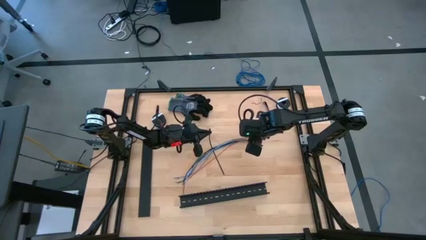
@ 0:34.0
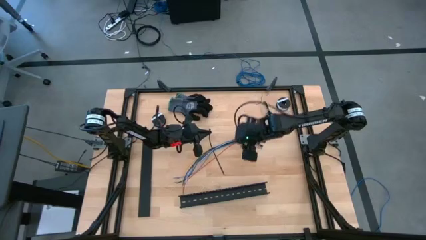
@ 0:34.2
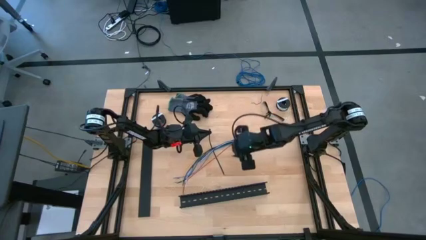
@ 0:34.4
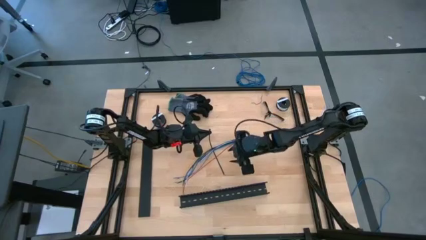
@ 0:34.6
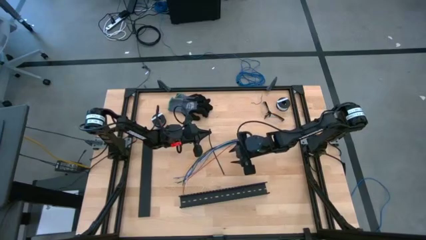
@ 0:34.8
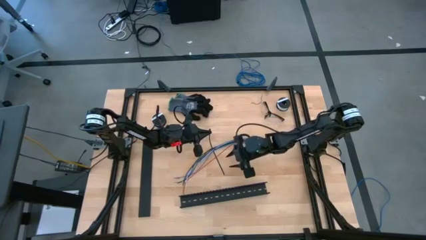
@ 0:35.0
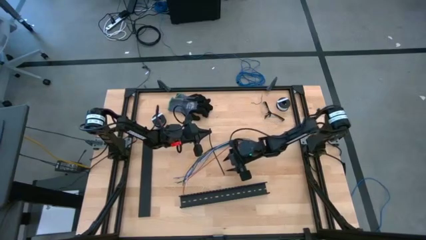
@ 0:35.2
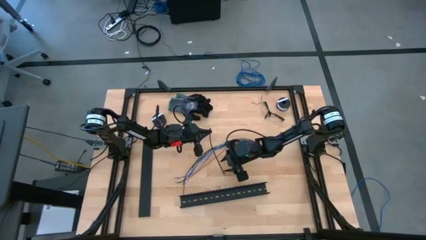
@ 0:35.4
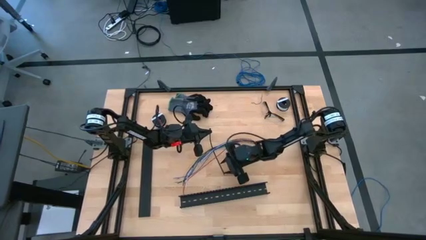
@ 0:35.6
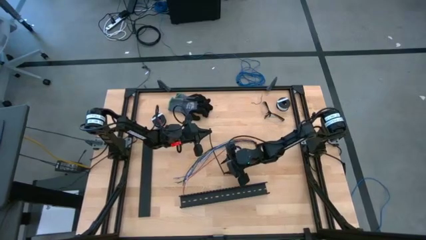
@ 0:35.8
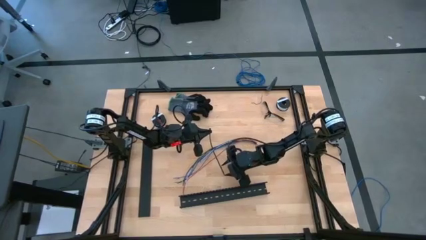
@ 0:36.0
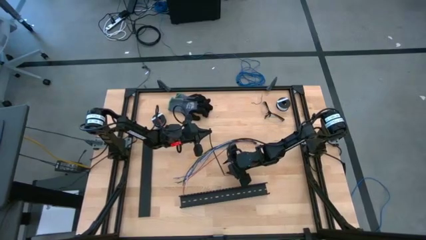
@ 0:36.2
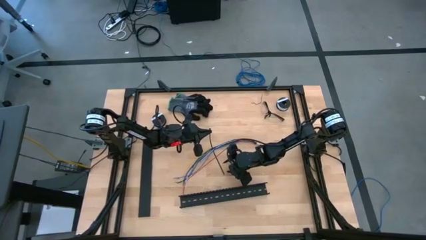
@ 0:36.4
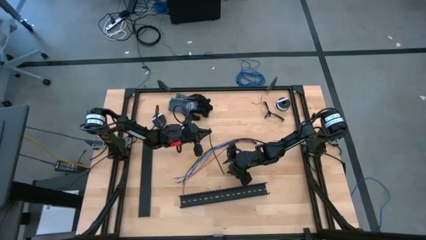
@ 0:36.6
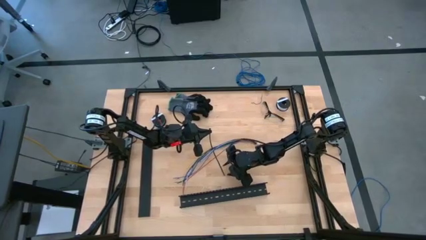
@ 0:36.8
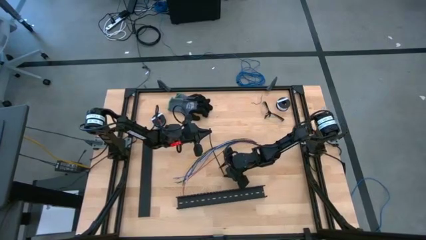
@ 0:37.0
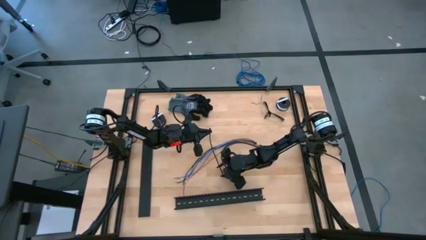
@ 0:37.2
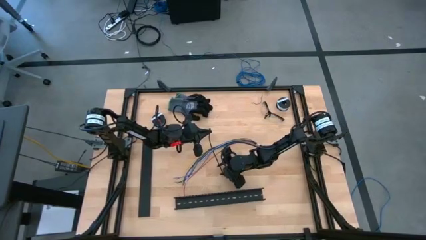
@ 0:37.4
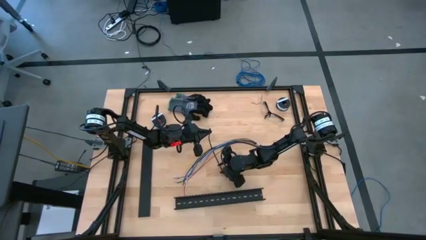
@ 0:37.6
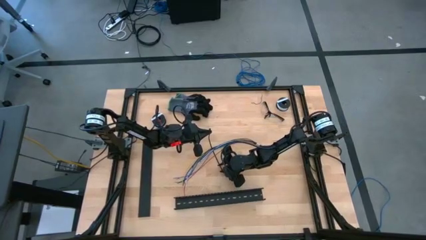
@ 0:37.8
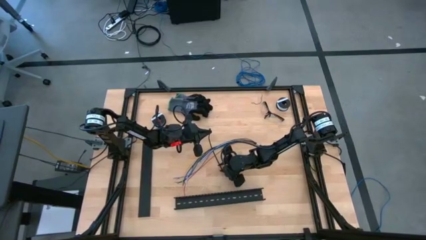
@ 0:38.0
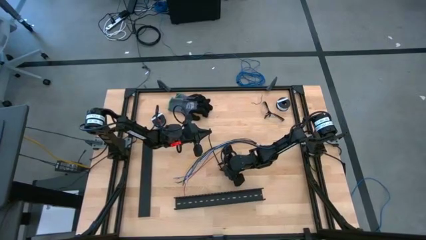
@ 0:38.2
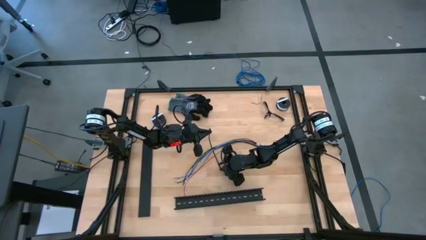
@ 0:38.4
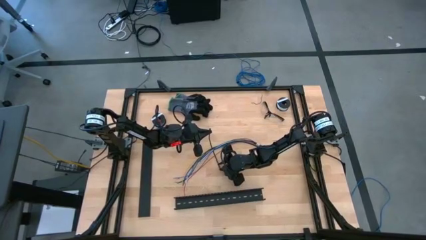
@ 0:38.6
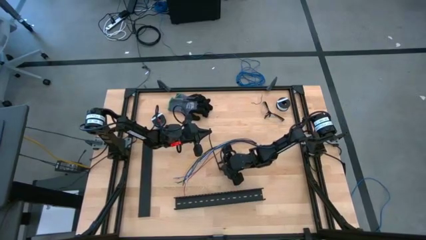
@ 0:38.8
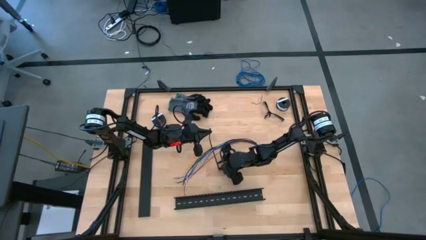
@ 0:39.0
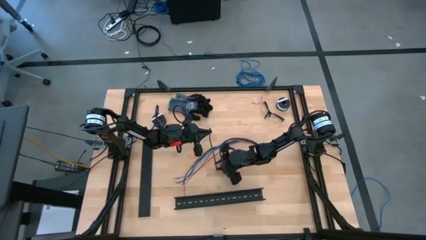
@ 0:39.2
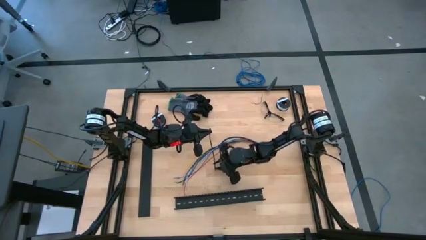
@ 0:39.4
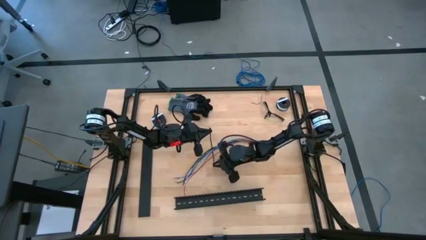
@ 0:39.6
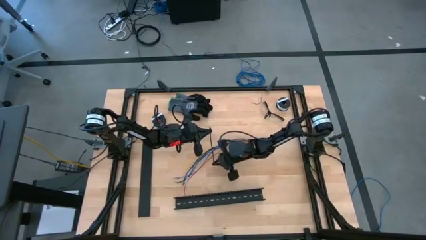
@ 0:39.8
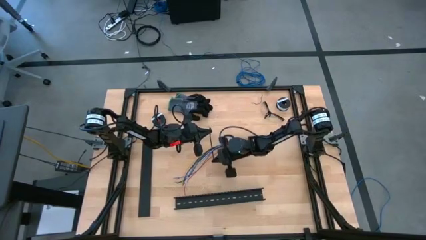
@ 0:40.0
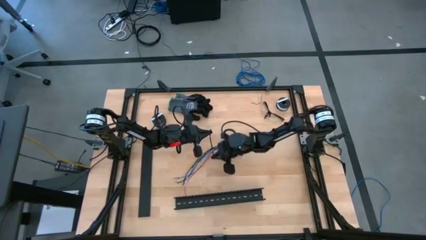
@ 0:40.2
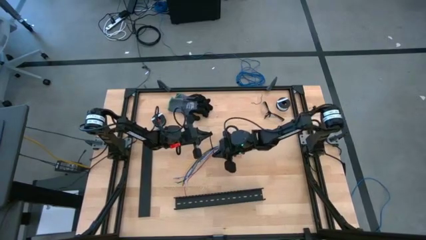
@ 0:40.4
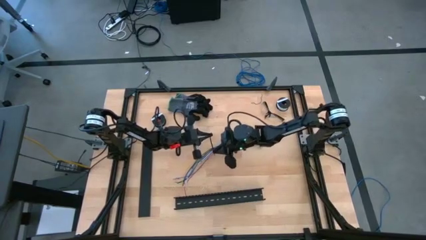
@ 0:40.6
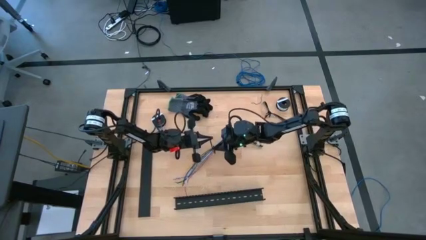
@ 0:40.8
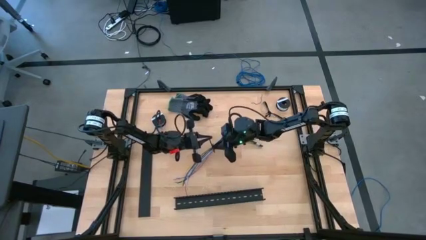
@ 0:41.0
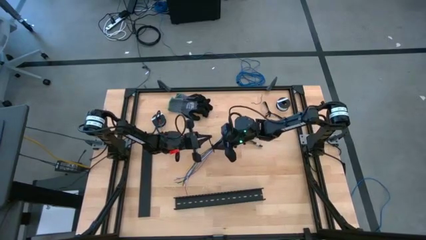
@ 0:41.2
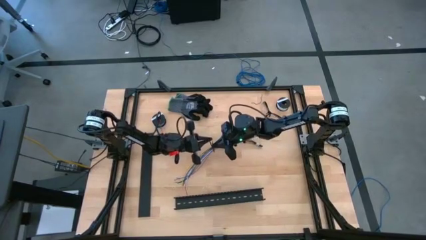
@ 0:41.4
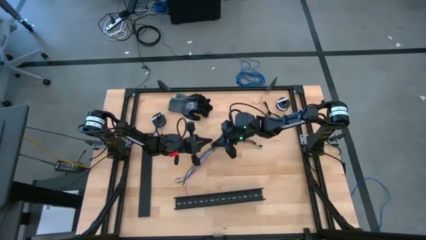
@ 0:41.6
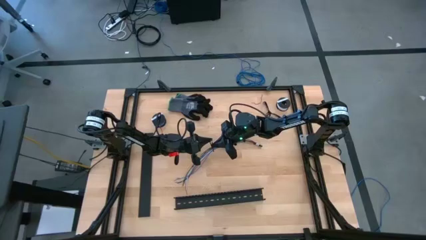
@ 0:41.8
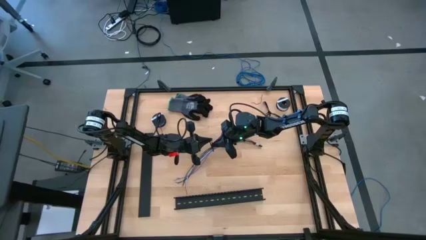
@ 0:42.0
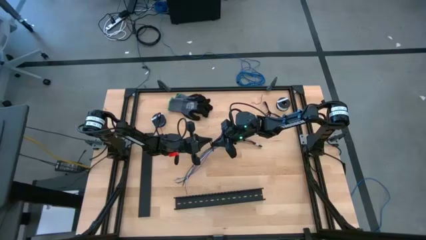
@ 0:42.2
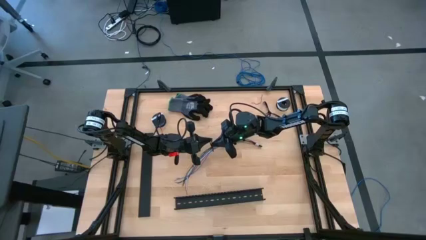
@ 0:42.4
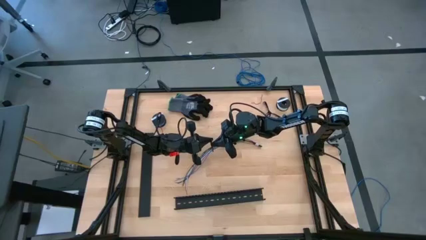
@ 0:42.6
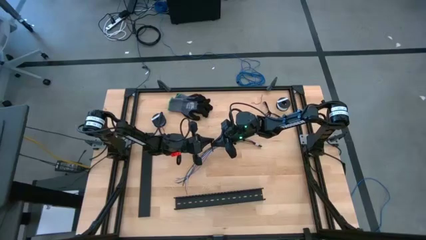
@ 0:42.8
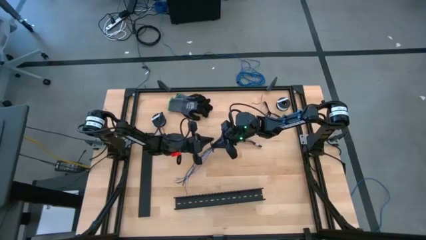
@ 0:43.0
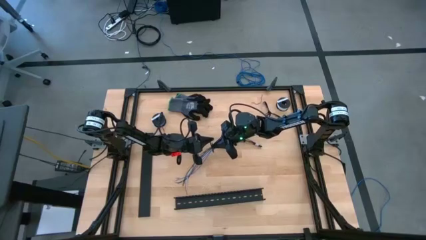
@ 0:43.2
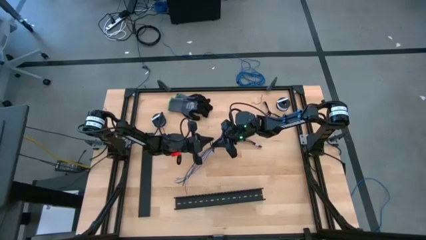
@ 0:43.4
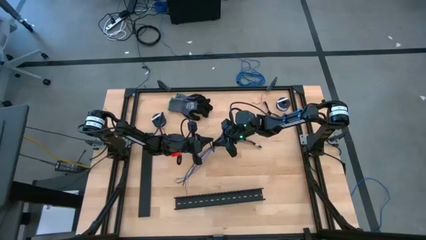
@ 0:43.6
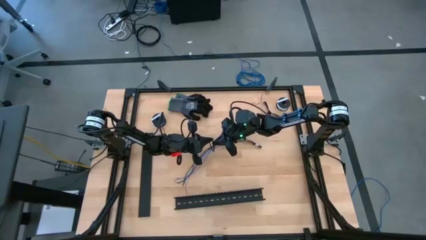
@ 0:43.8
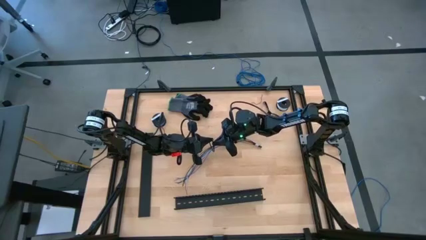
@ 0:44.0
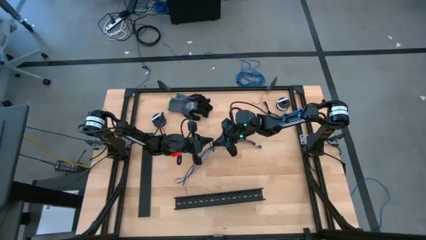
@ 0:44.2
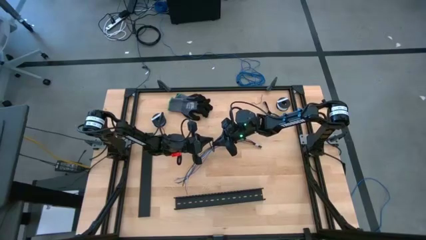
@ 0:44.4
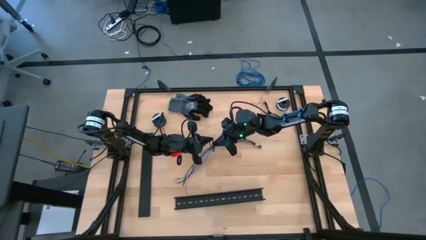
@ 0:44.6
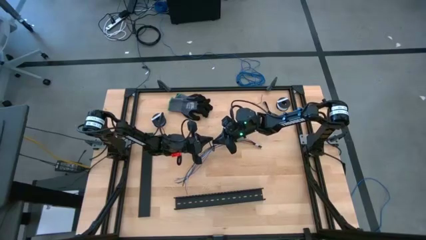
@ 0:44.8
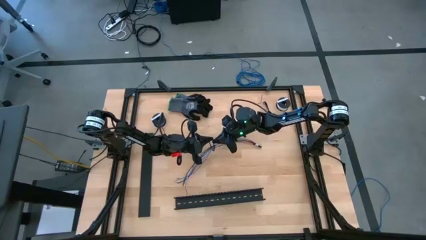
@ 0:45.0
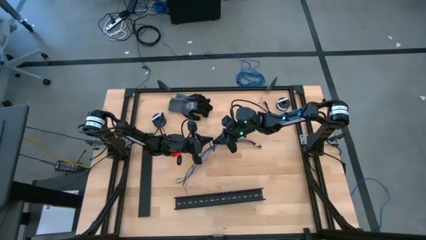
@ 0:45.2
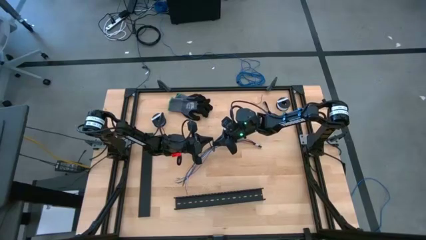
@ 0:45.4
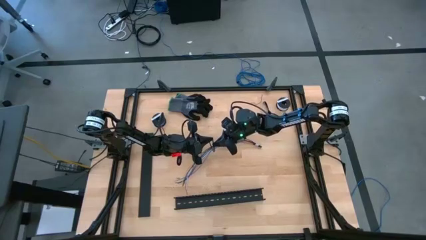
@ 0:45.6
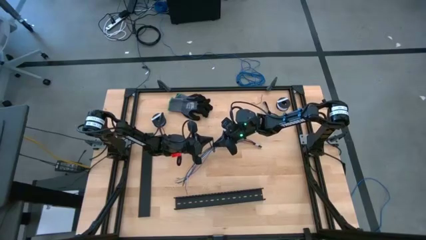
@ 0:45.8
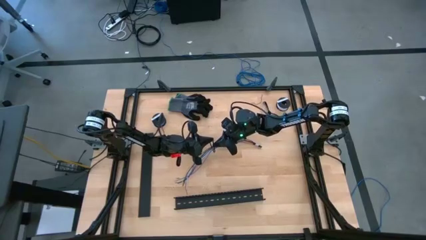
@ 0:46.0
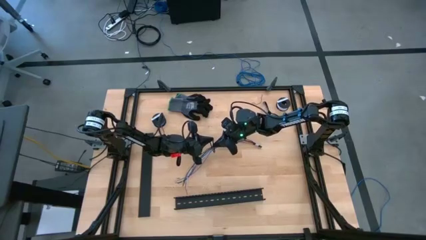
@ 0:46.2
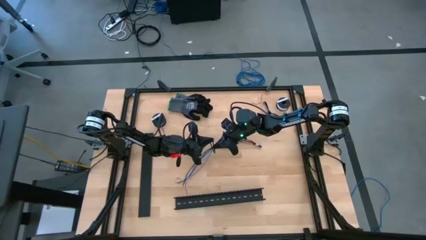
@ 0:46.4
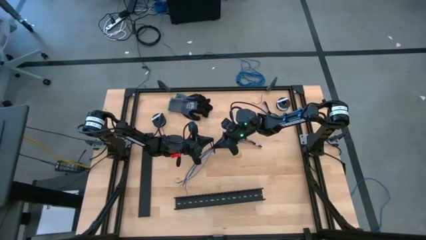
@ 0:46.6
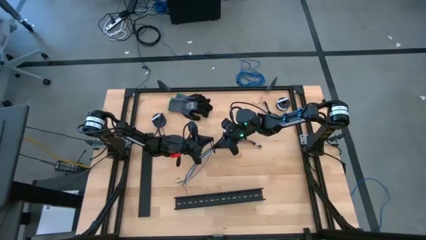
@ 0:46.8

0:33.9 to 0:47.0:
Task: Ziptie cables
Wrap the cables together using the black zip tie
